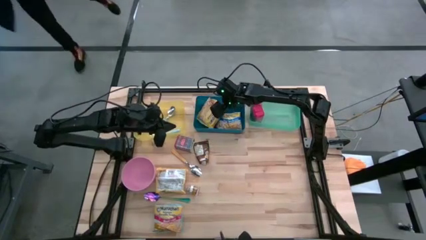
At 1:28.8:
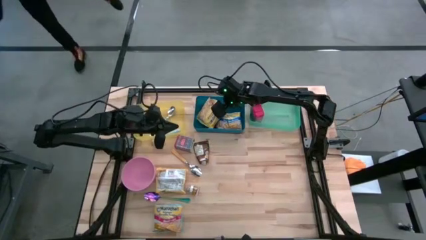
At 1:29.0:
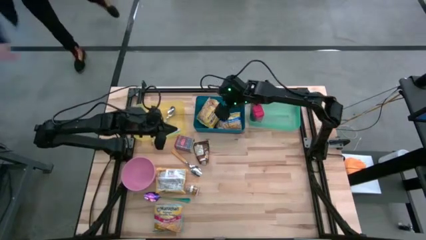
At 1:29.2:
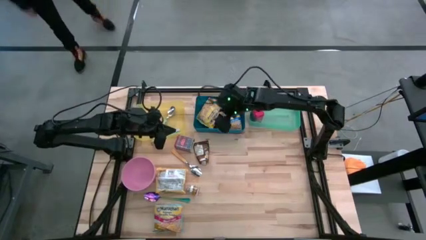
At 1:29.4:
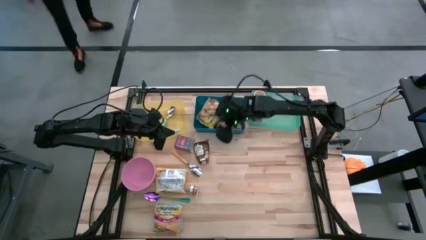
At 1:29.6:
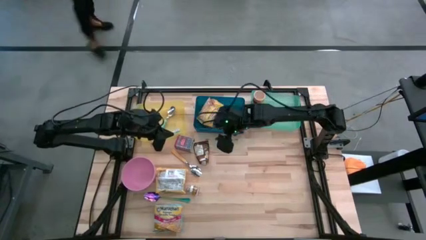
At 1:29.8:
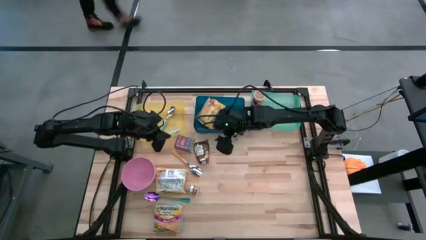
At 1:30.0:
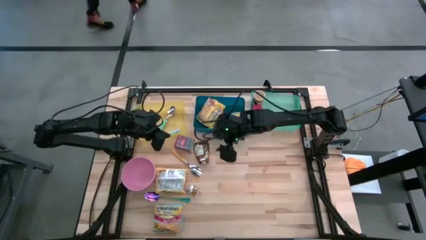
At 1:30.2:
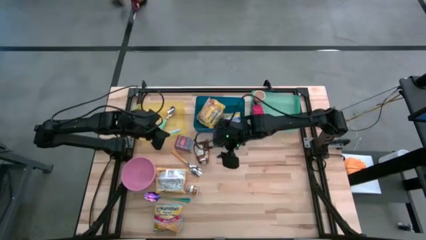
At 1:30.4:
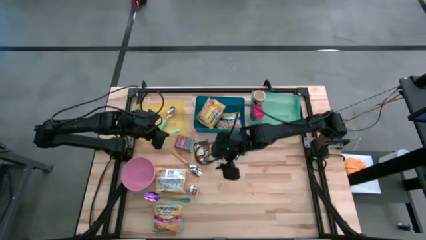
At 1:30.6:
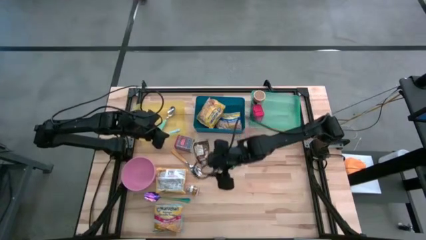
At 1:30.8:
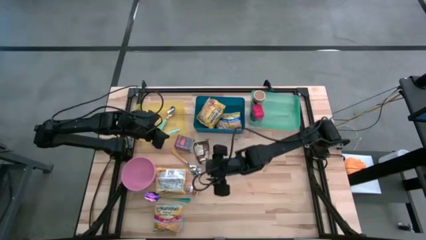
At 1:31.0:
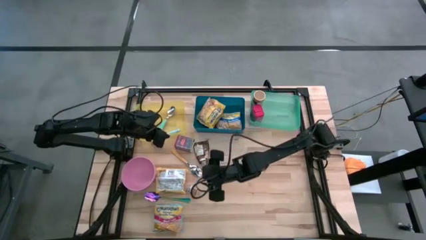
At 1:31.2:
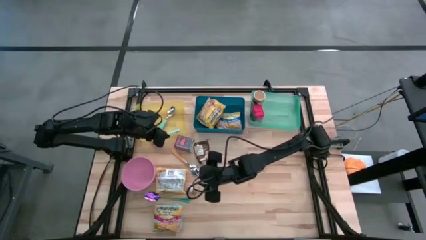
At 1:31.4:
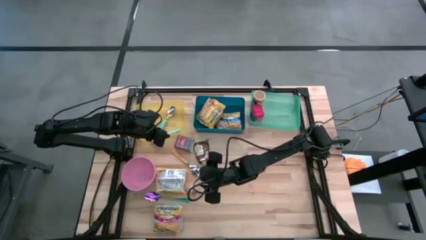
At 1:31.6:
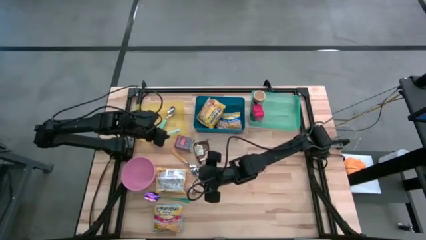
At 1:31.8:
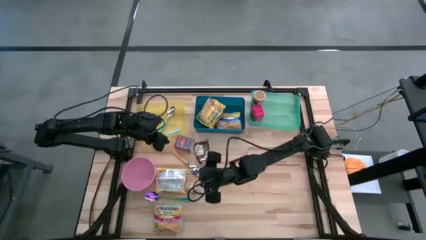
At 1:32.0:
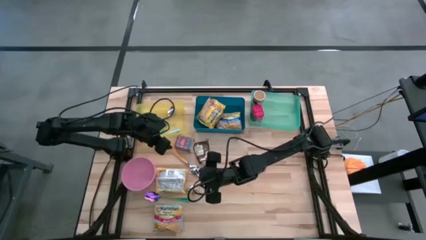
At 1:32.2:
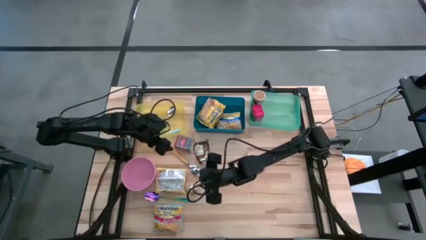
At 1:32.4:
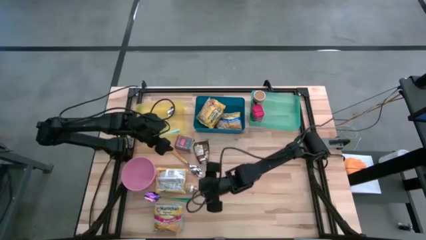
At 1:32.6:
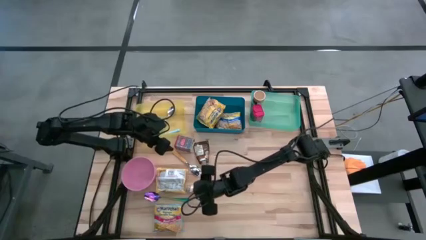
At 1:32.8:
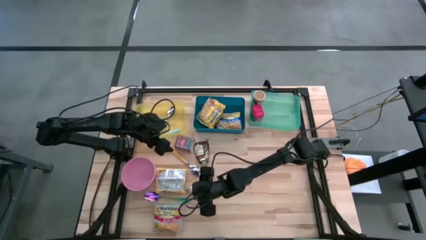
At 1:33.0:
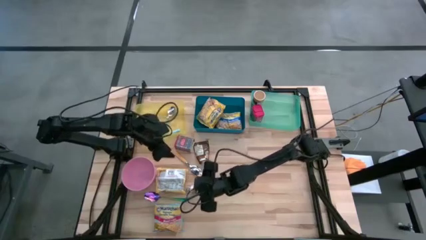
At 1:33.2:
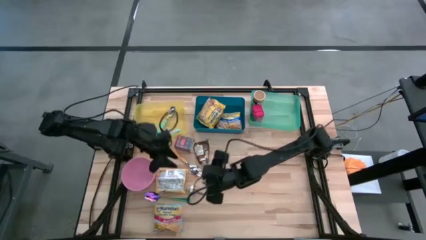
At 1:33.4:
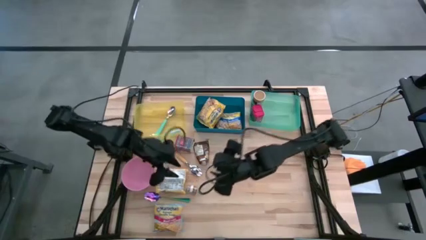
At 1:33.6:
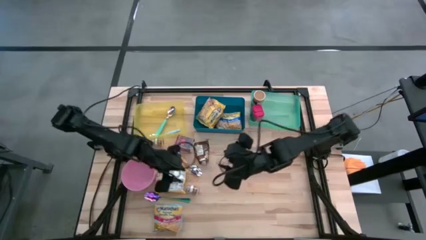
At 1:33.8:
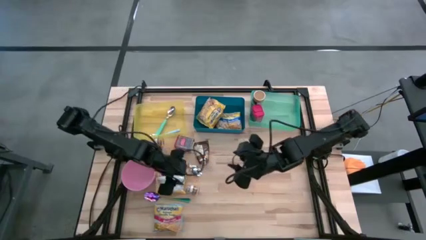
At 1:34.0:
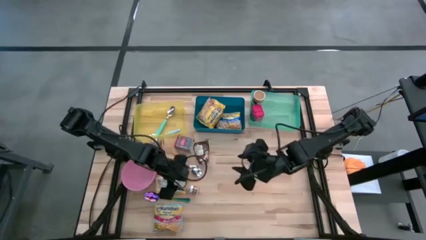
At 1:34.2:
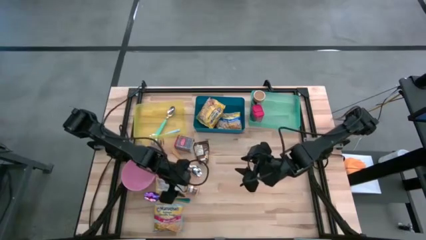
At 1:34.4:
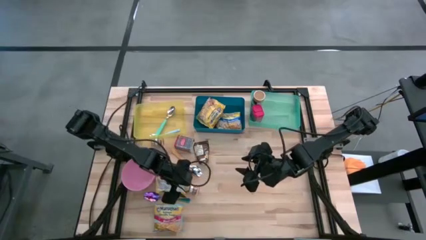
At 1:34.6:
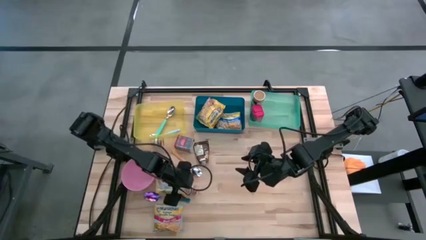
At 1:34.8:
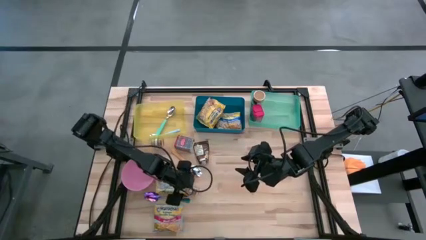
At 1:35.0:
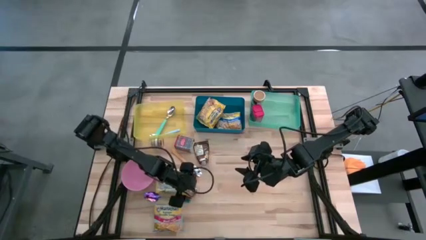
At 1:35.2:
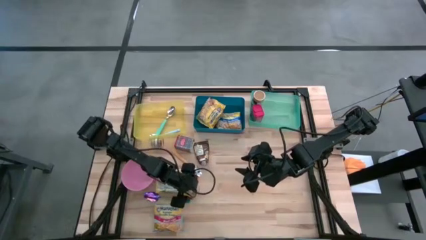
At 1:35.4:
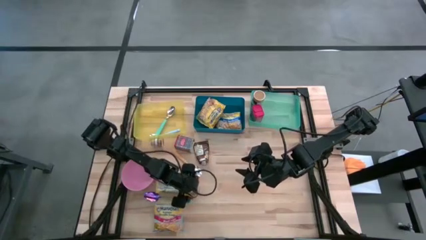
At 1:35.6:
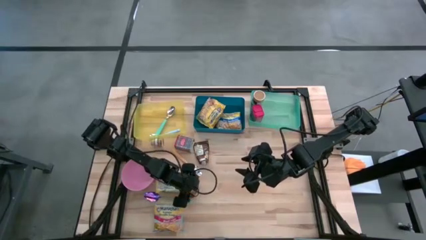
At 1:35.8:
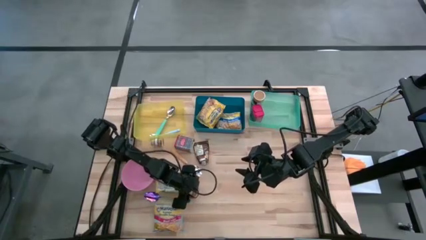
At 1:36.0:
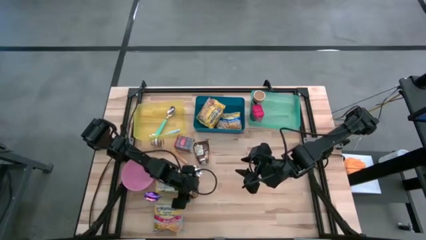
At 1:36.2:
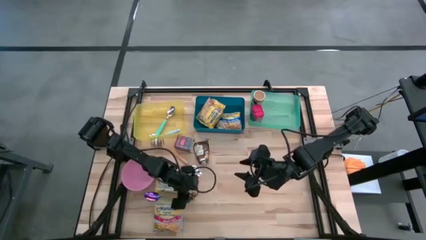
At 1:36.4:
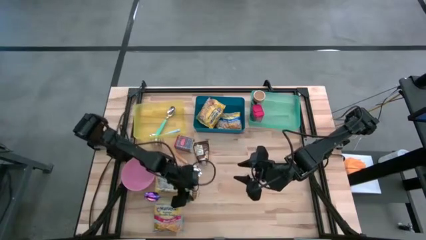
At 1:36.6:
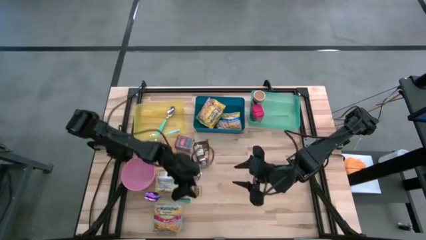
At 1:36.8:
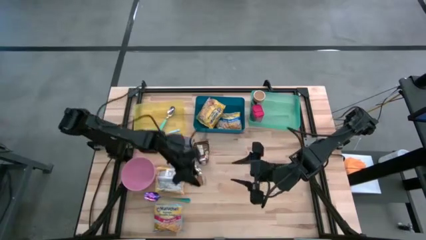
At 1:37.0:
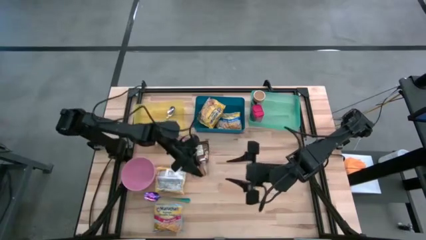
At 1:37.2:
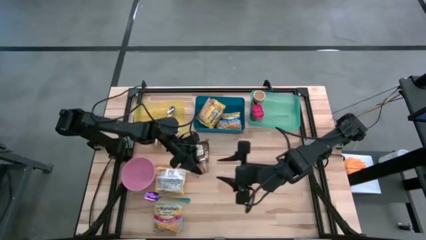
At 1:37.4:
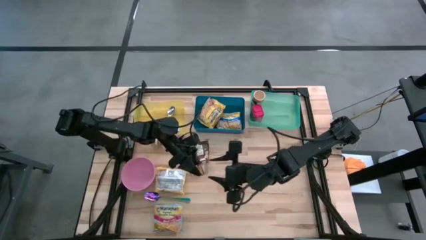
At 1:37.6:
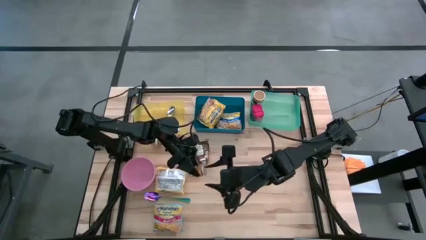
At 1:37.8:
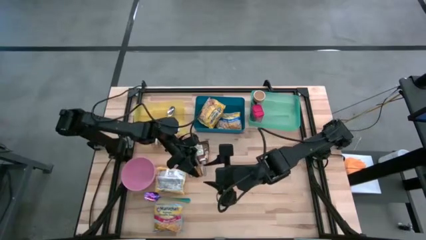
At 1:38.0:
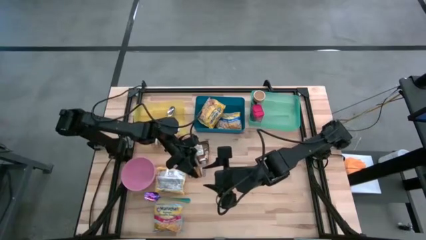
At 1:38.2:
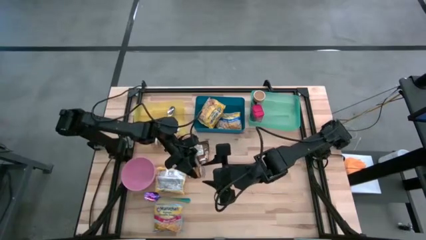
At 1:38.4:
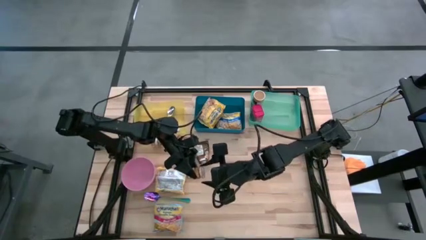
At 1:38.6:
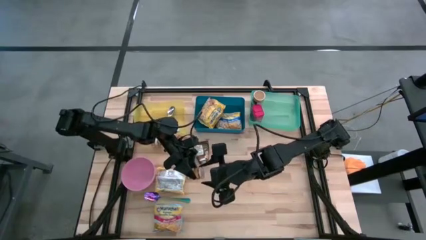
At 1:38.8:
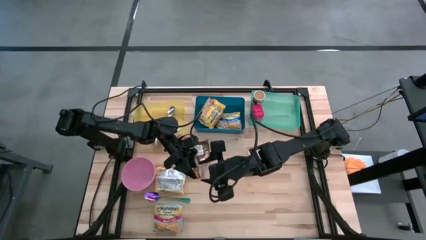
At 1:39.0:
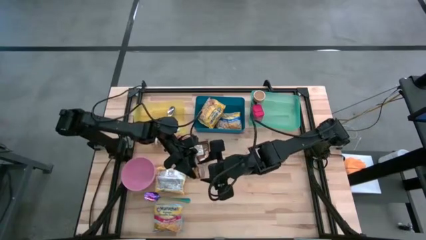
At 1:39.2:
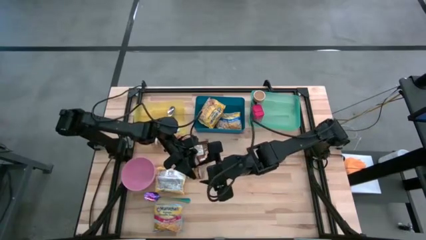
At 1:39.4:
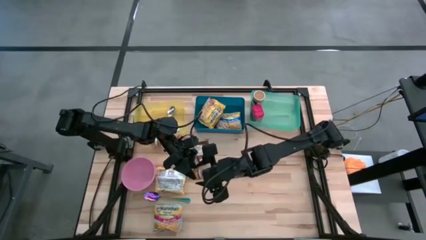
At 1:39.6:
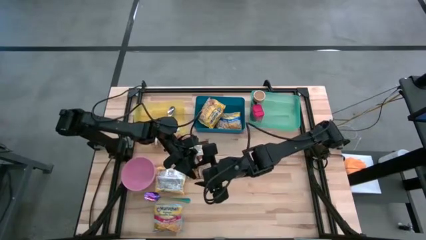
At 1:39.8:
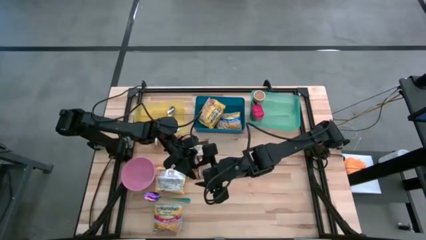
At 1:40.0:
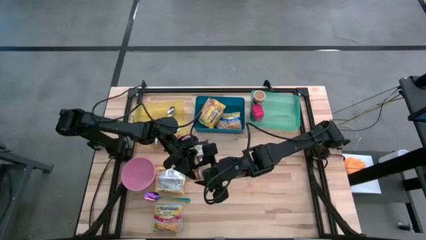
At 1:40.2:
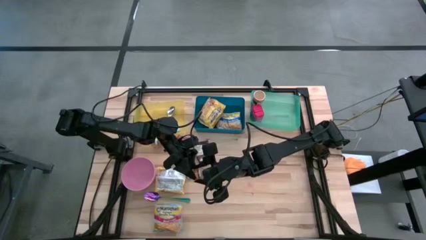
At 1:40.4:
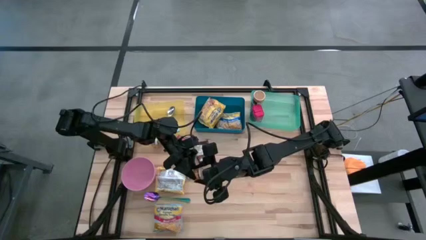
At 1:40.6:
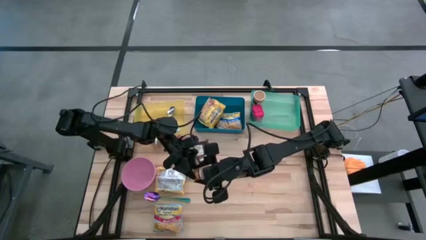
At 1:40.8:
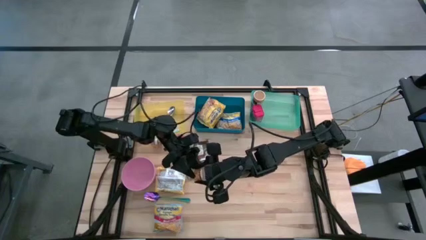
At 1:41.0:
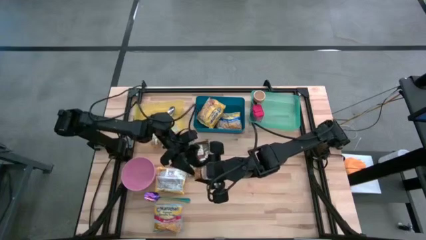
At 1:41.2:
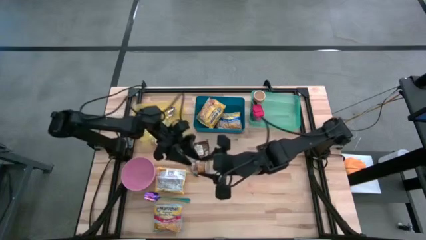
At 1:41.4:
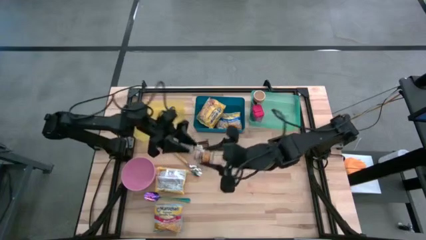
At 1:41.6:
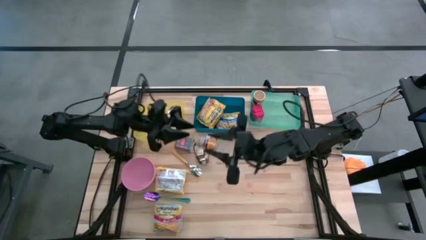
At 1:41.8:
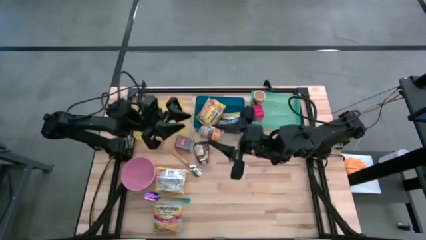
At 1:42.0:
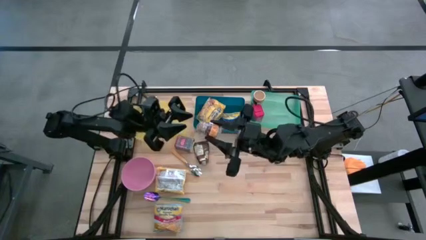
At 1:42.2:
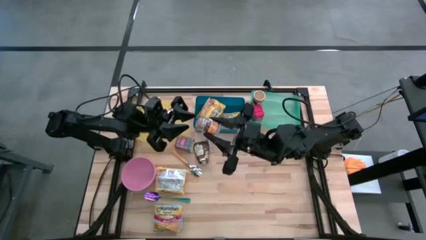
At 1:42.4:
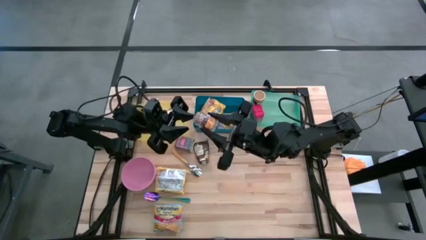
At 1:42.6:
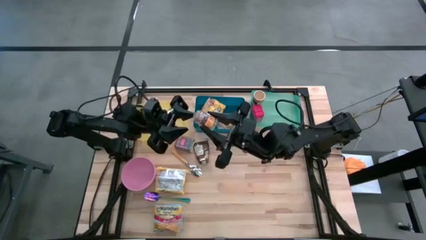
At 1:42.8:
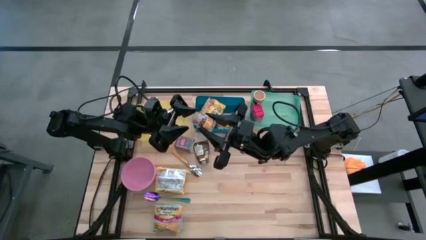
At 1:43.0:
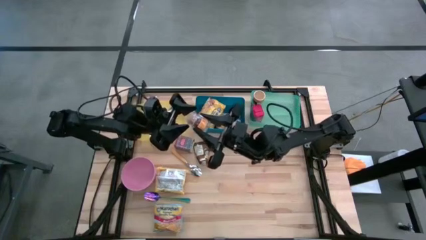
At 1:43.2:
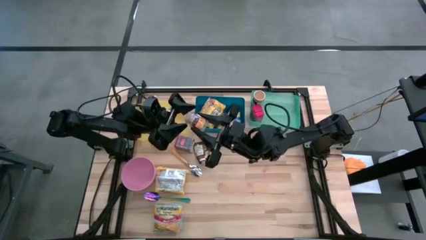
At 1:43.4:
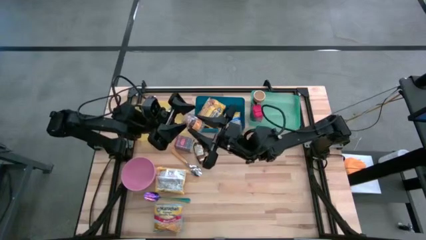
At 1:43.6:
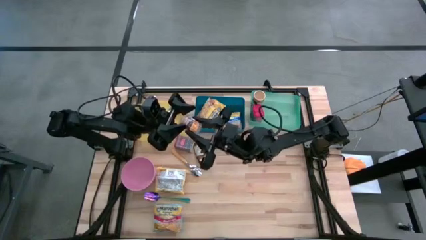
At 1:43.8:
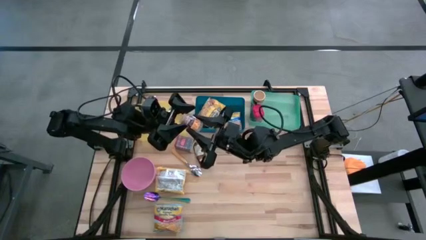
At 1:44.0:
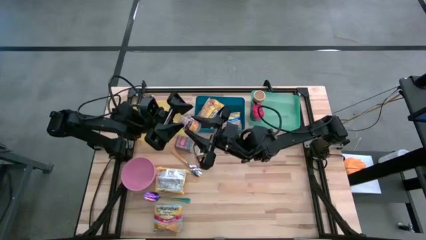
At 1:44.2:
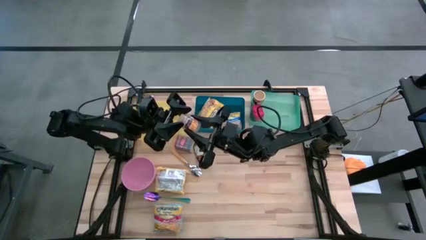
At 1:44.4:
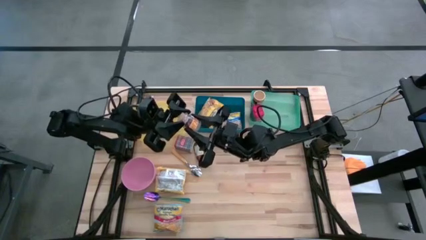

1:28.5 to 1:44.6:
Put the bottom brown seasoning bottle into the light green bin
